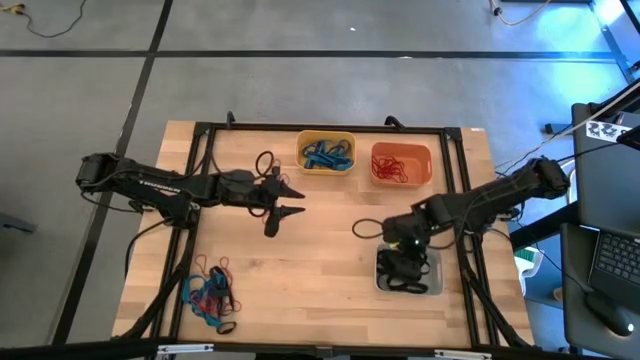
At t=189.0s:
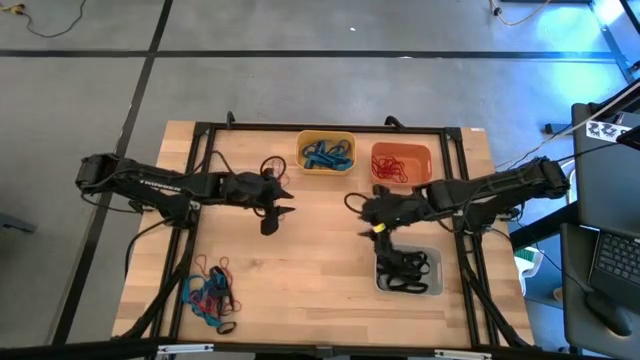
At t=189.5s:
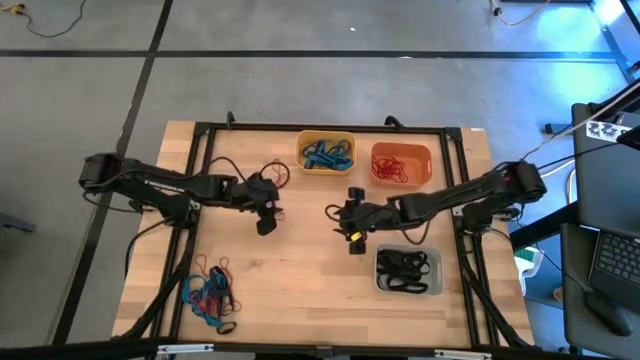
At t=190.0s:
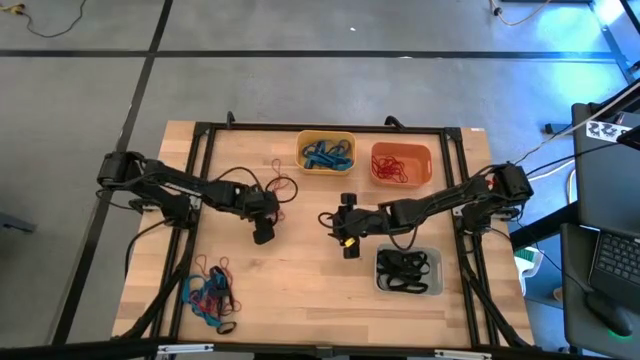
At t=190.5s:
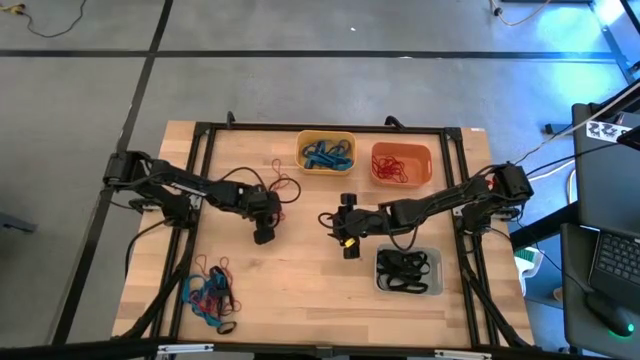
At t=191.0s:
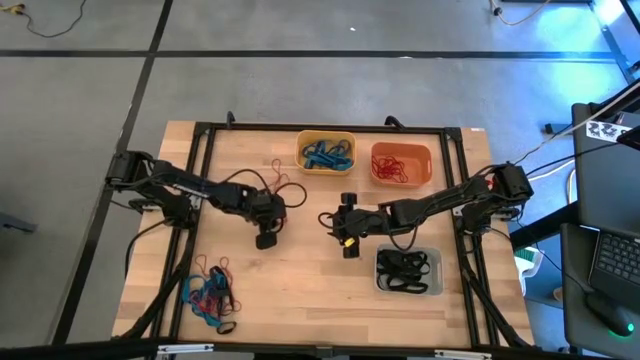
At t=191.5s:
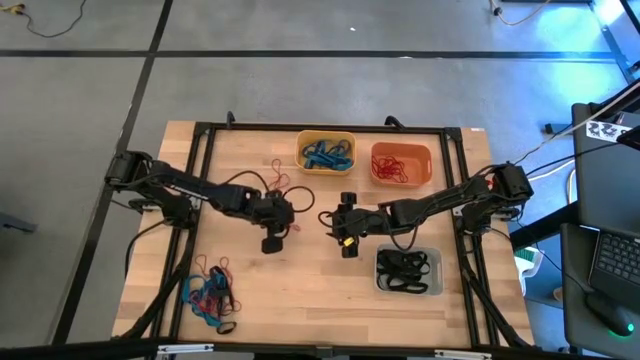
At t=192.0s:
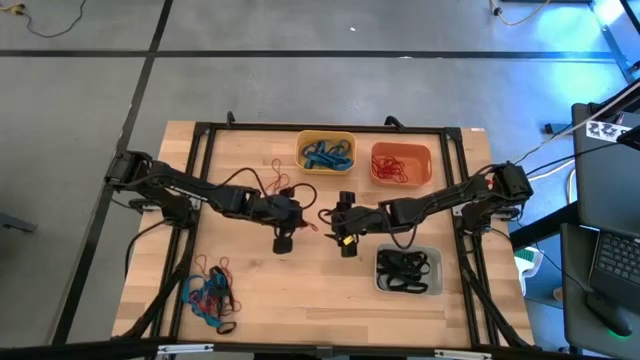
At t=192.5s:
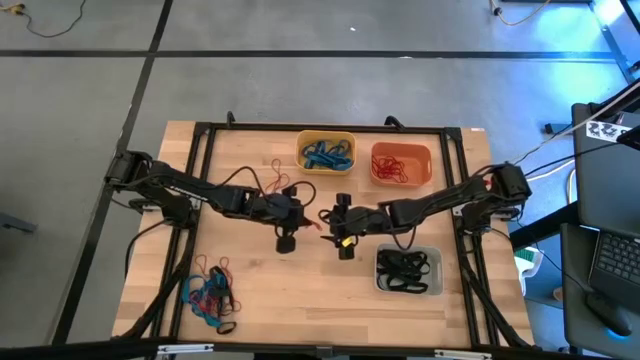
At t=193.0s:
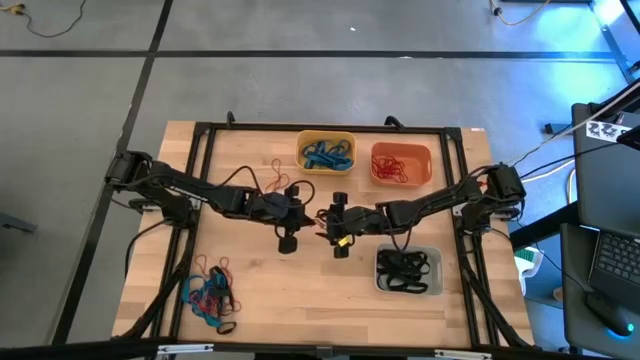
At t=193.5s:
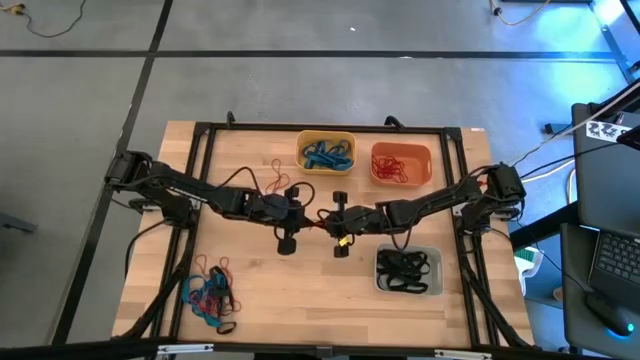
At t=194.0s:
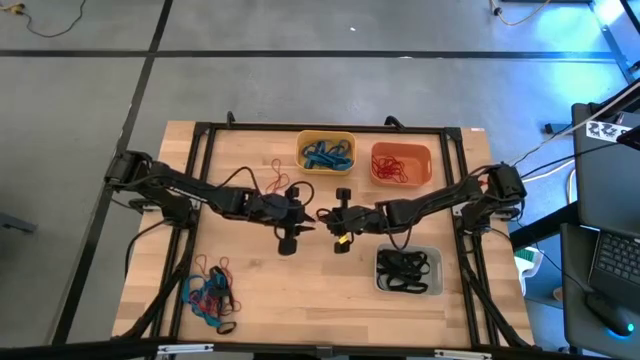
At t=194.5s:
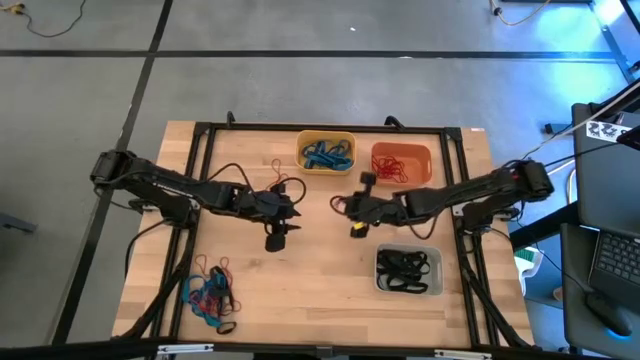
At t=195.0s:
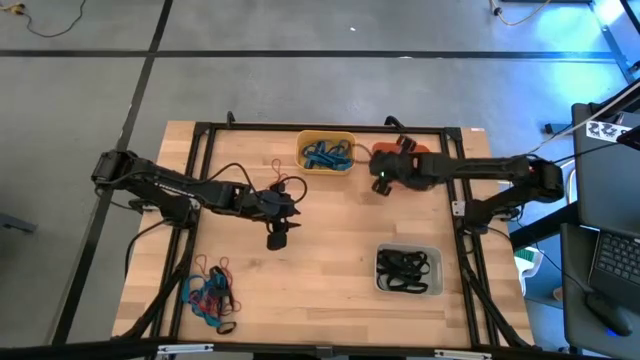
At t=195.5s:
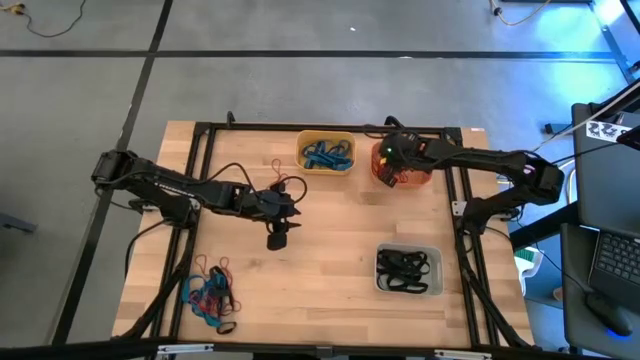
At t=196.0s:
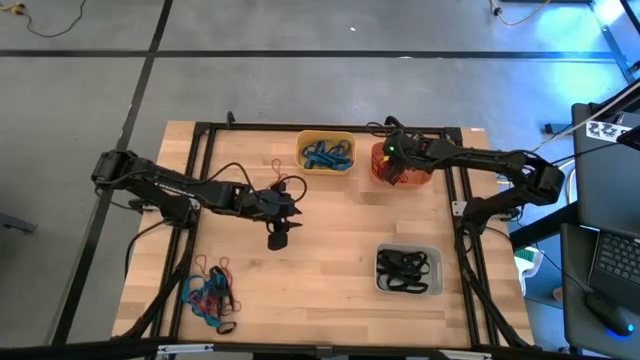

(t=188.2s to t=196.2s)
Task: Sort rubber bands into baskets
Put the red rubber band into the orange bin

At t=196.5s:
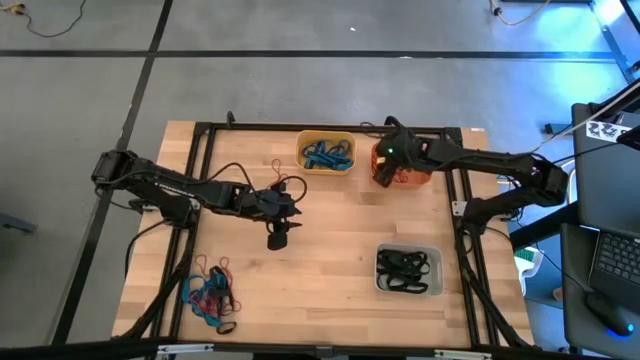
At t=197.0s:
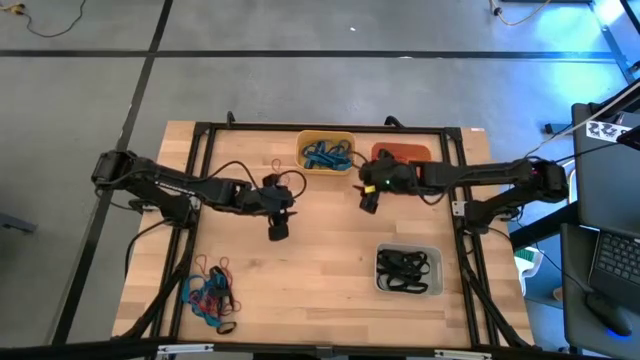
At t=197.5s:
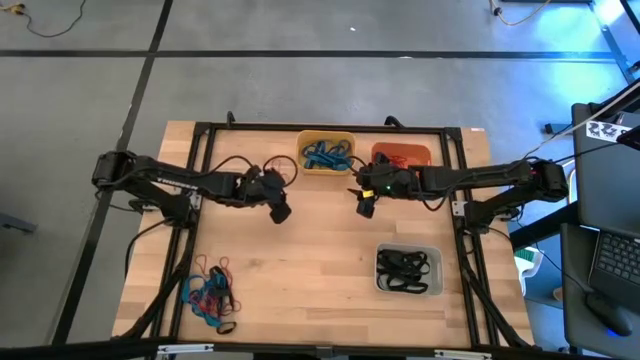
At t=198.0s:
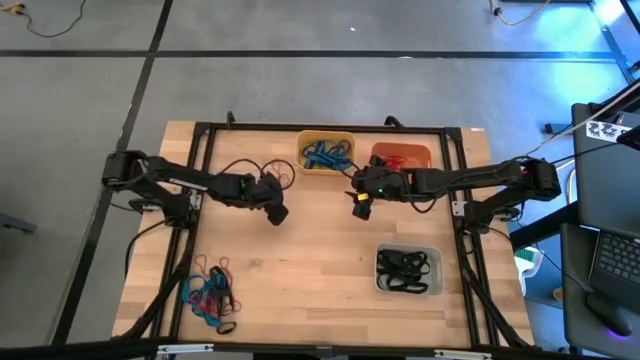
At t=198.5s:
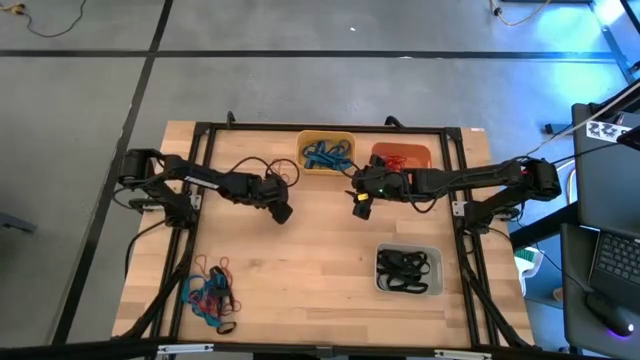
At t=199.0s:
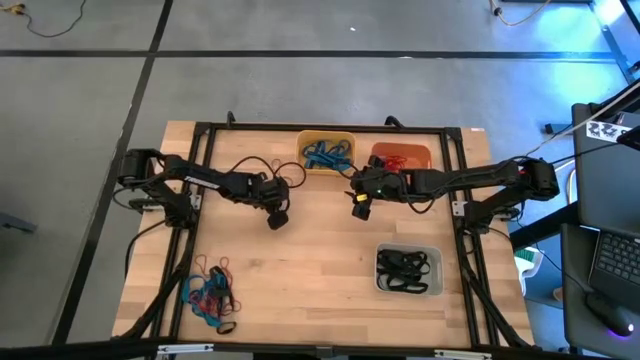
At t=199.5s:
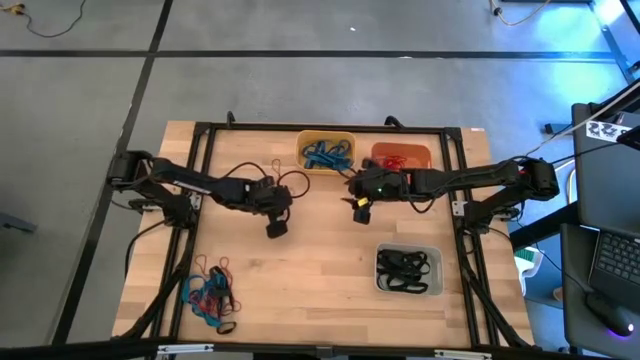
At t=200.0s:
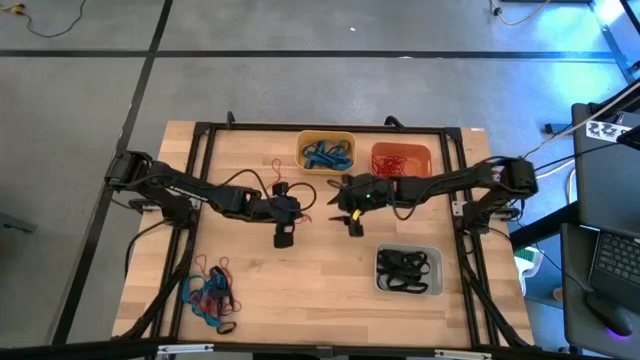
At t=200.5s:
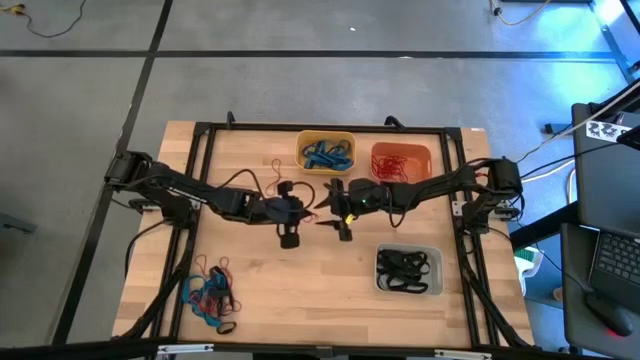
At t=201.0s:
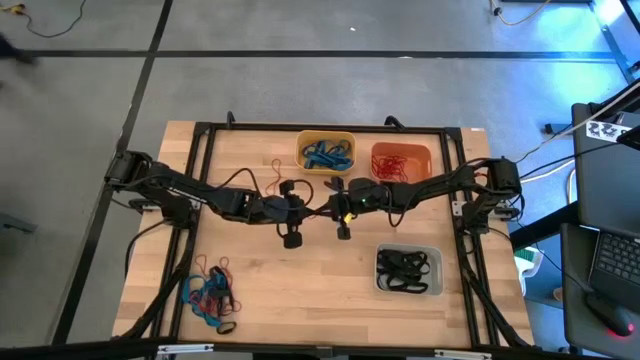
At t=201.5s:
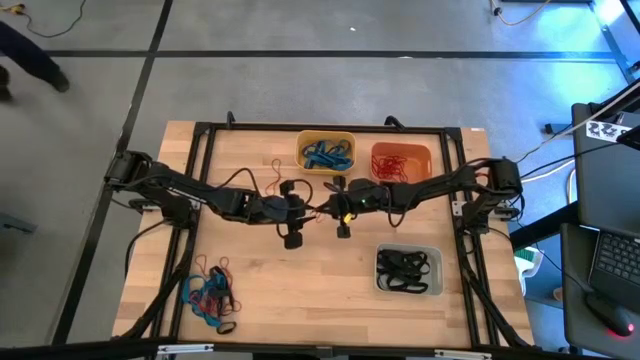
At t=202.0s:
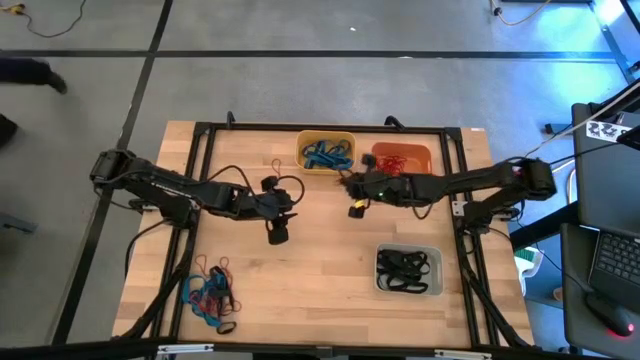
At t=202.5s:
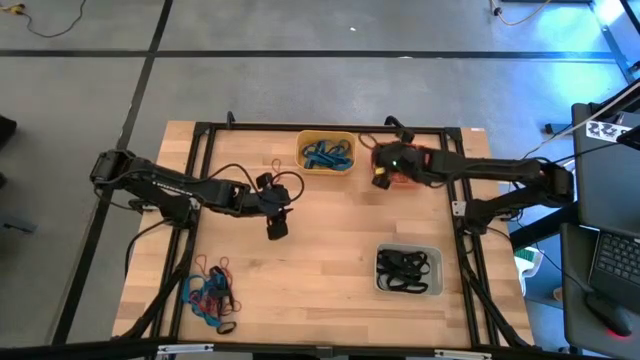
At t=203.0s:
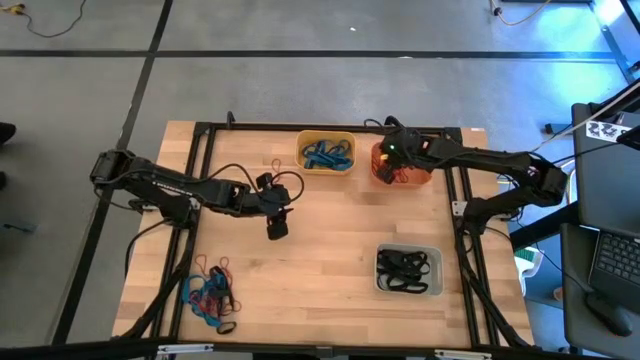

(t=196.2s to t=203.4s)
Put the red rubber band into the orange bin

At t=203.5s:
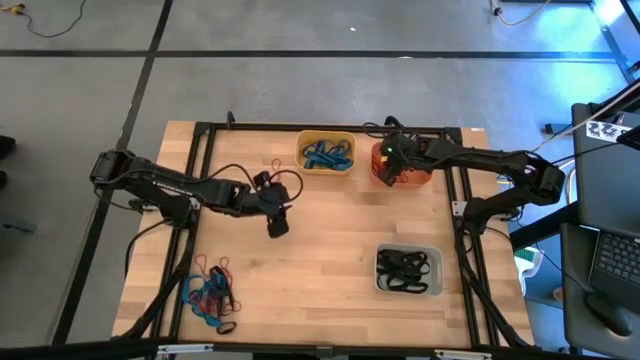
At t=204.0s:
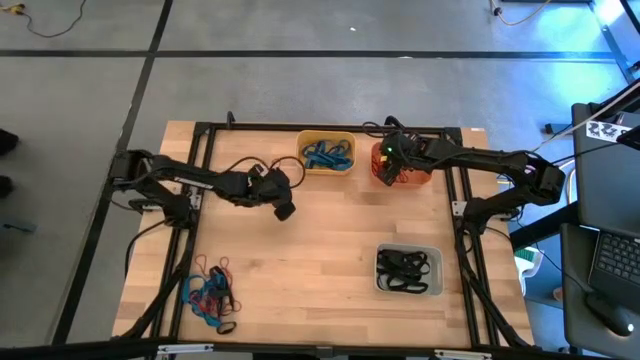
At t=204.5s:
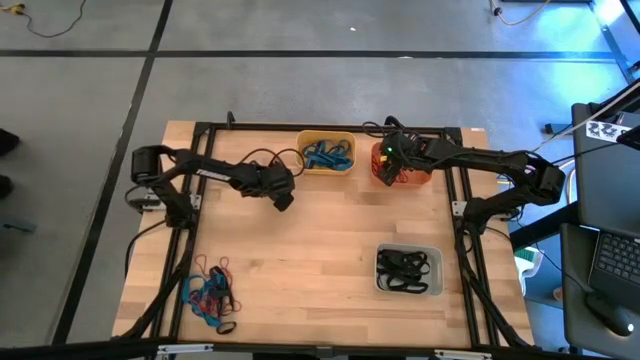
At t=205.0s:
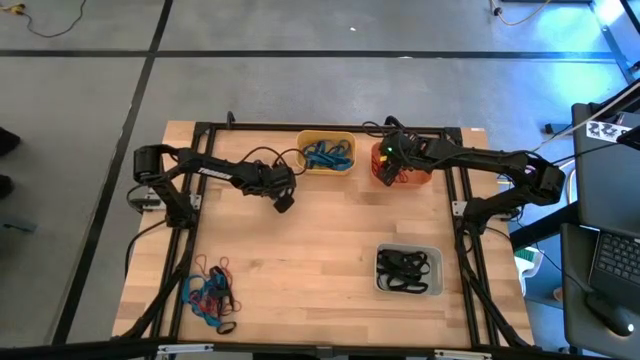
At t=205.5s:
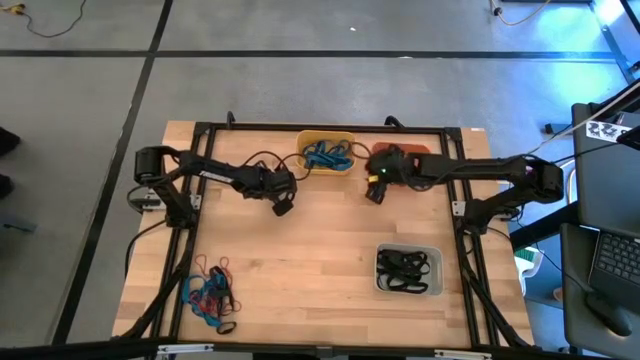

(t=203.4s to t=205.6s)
Put the red rubber band into the orange bin

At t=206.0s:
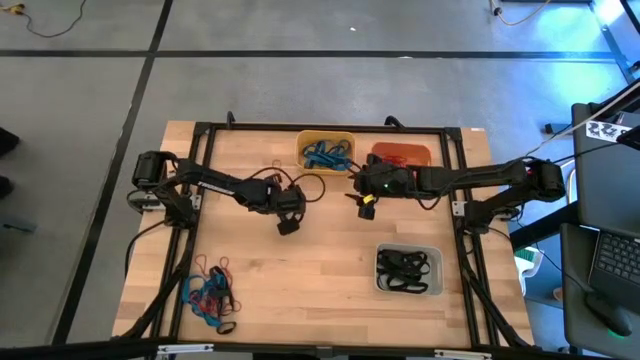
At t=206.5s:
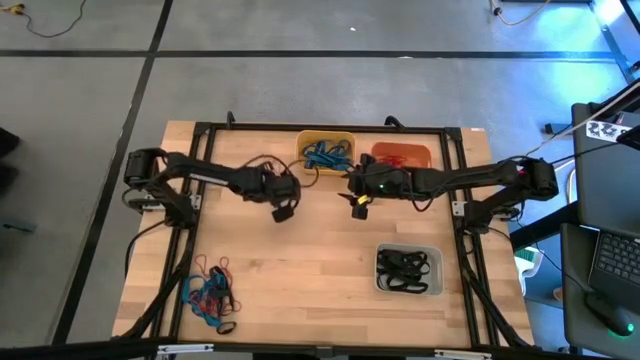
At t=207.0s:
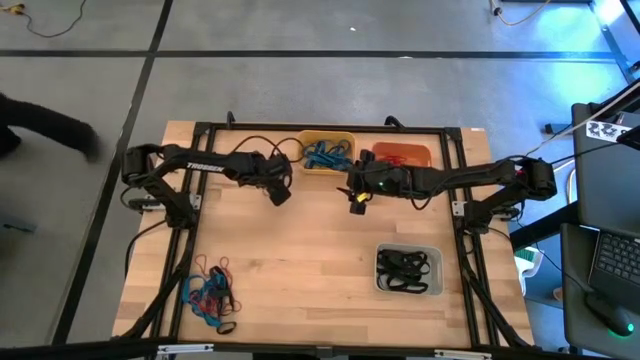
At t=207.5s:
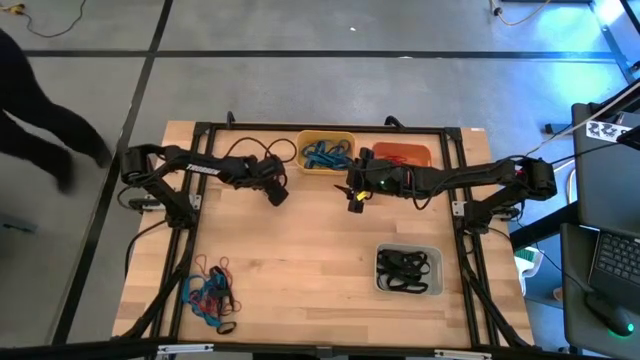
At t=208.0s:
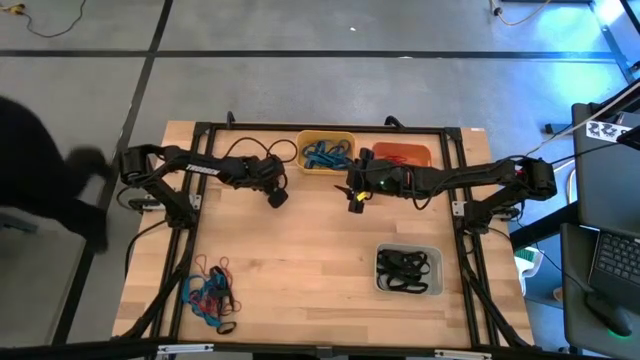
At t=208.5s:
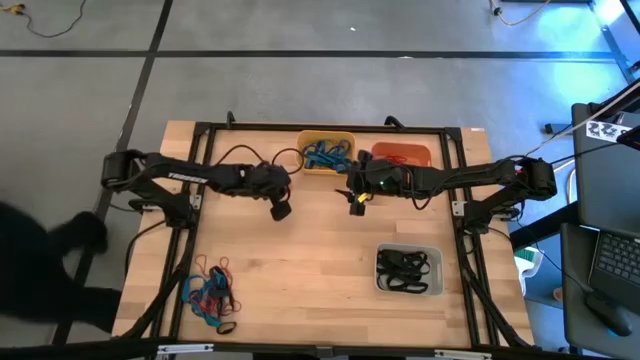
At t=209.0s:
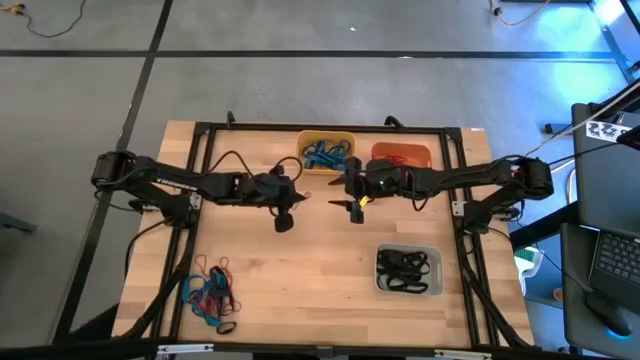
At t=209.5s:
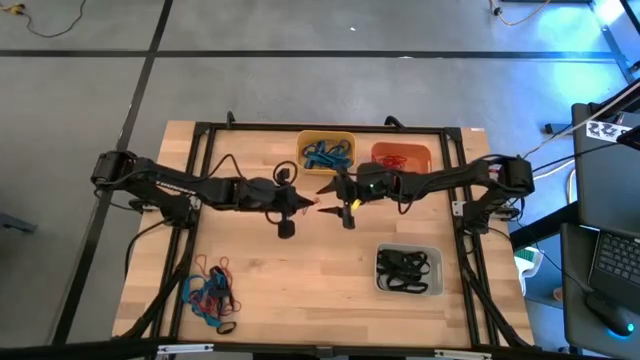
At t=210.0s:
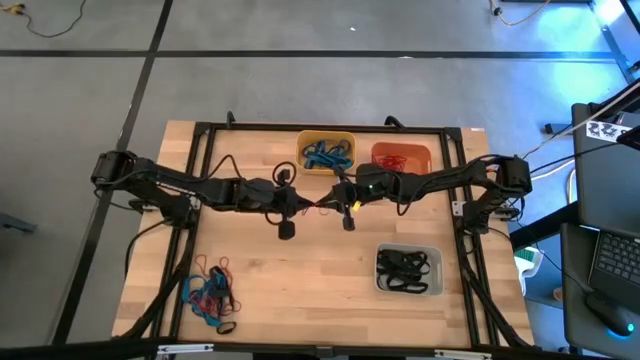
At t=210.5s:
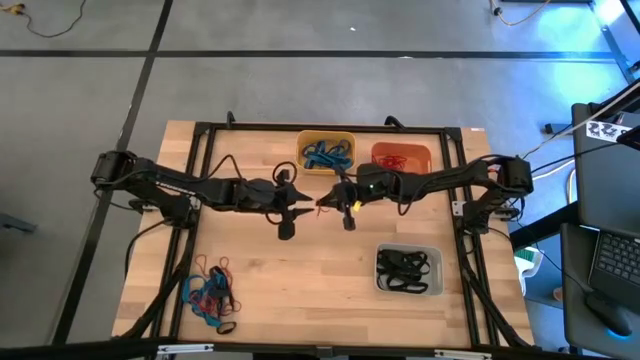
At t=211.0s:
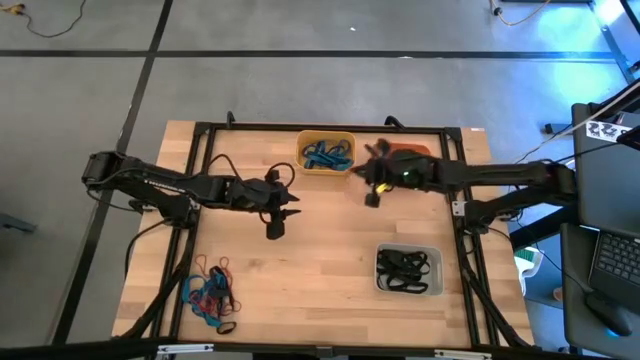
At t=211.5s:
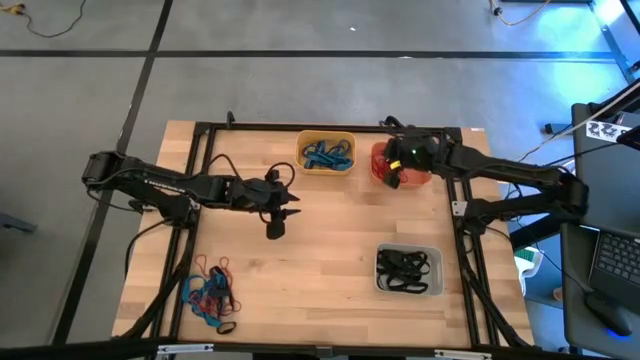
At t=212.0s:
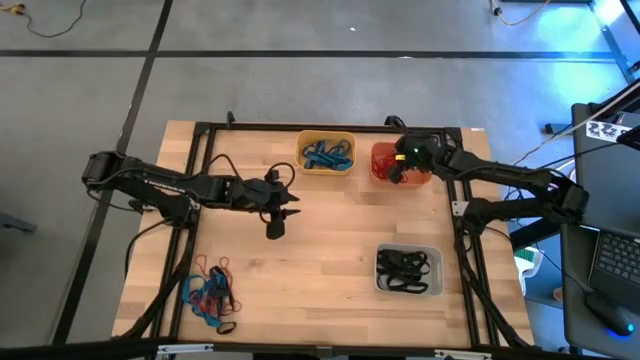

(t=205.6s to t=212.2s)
Put the red rubber band into the orange bin
